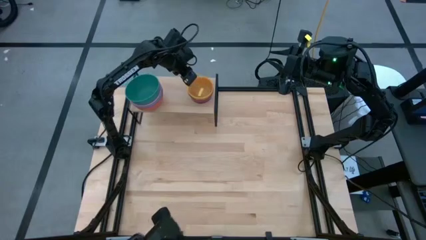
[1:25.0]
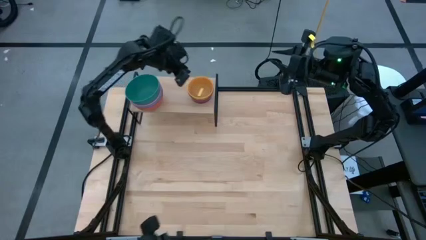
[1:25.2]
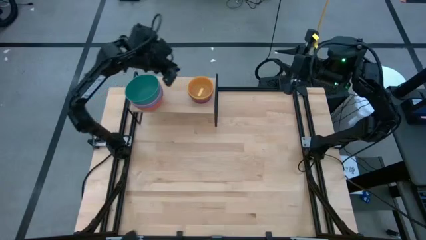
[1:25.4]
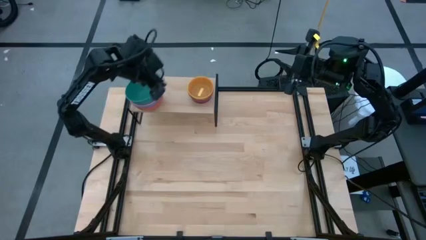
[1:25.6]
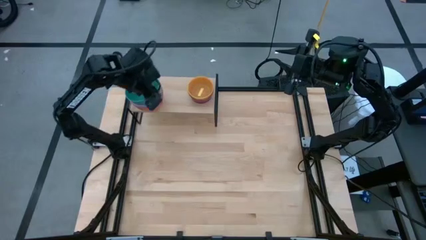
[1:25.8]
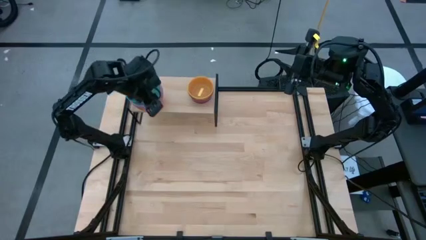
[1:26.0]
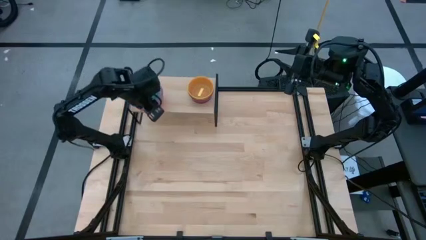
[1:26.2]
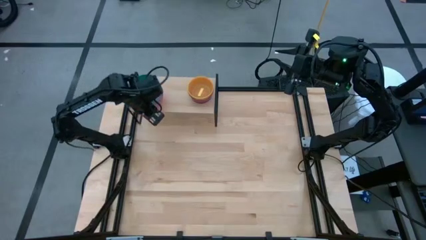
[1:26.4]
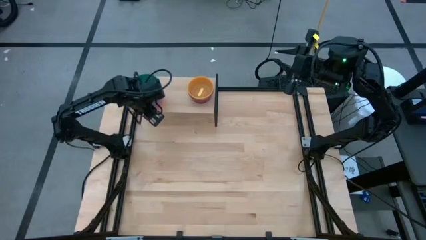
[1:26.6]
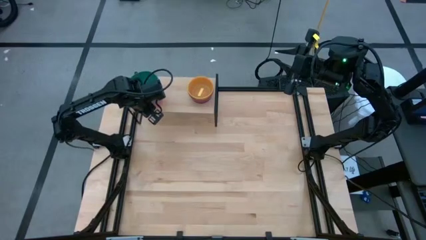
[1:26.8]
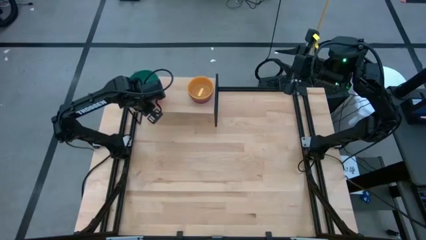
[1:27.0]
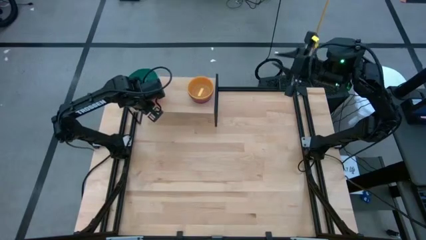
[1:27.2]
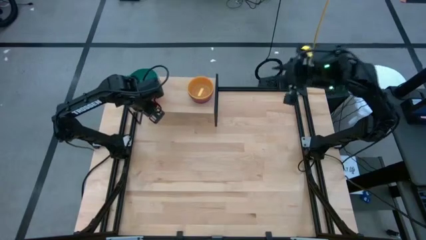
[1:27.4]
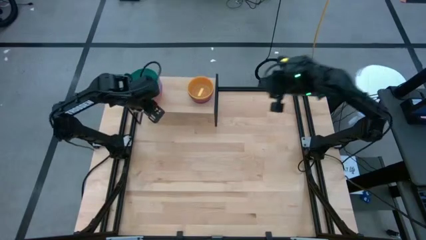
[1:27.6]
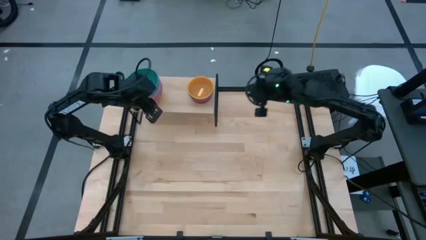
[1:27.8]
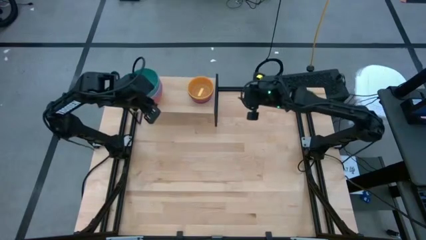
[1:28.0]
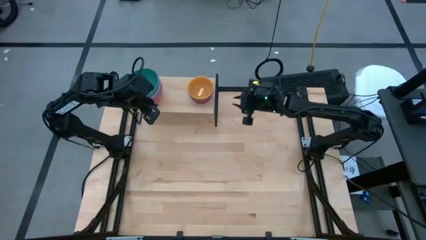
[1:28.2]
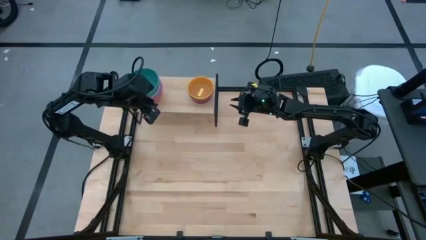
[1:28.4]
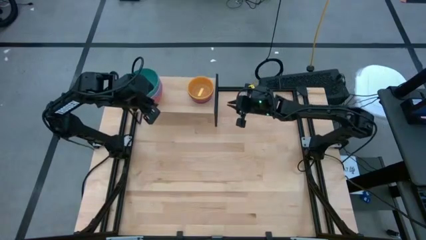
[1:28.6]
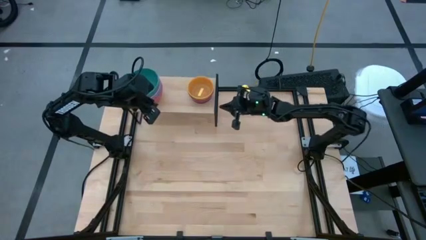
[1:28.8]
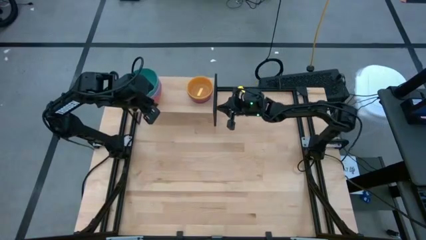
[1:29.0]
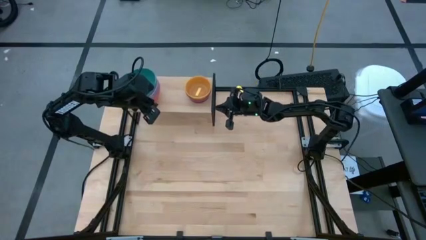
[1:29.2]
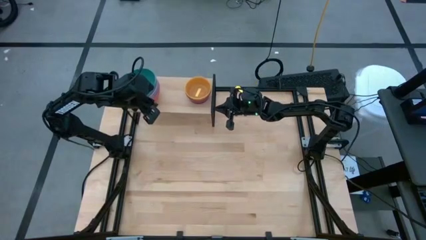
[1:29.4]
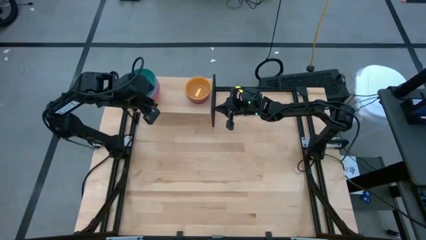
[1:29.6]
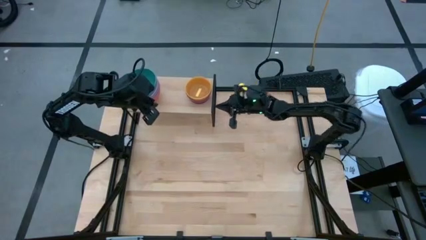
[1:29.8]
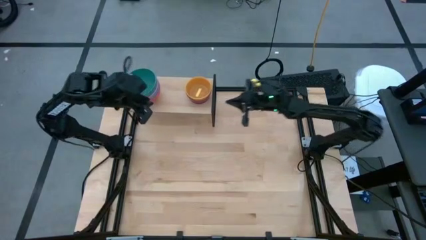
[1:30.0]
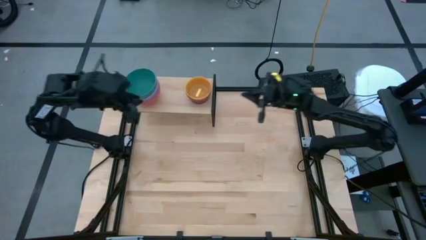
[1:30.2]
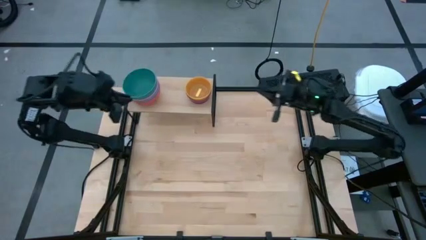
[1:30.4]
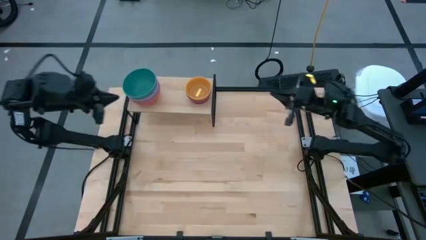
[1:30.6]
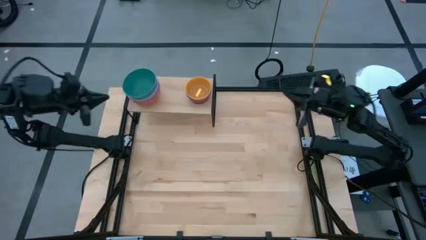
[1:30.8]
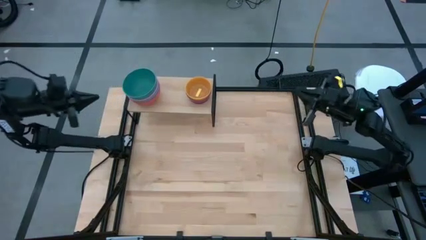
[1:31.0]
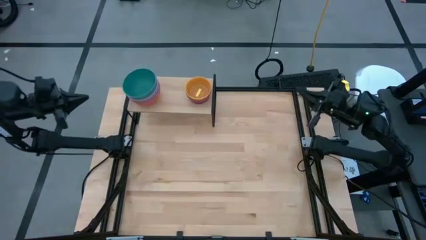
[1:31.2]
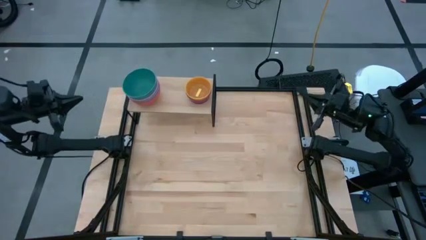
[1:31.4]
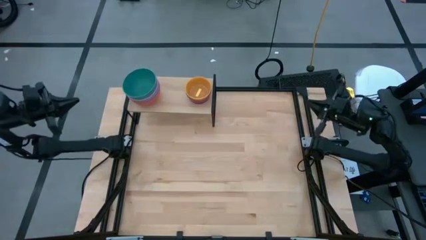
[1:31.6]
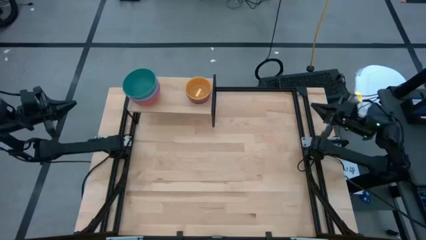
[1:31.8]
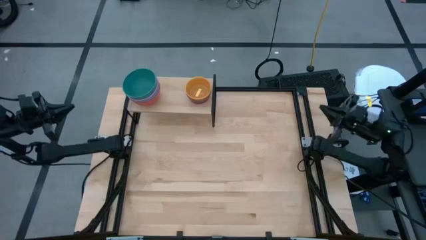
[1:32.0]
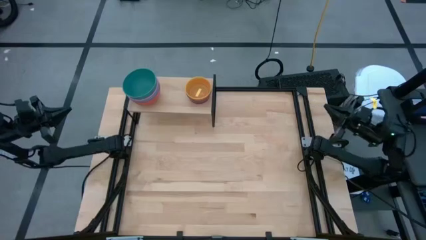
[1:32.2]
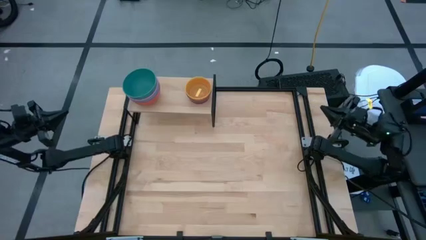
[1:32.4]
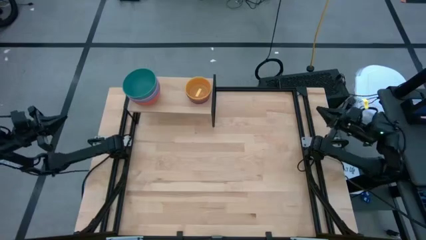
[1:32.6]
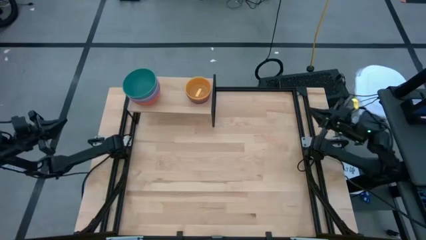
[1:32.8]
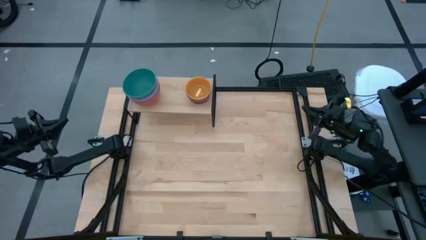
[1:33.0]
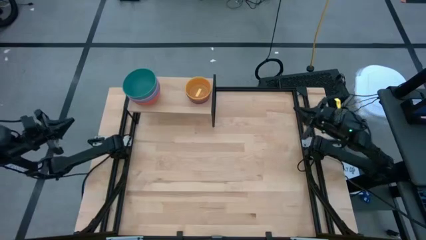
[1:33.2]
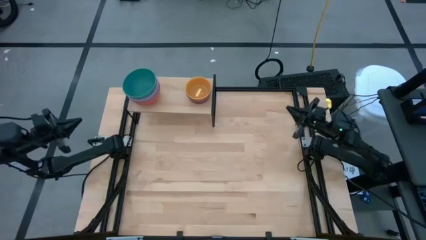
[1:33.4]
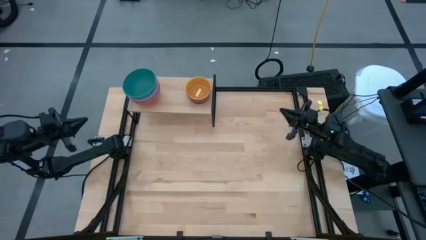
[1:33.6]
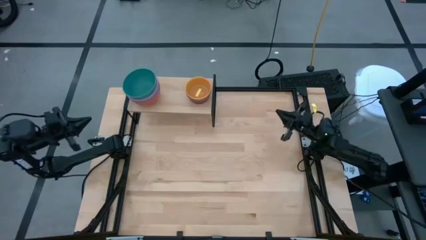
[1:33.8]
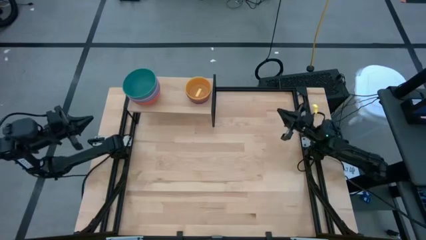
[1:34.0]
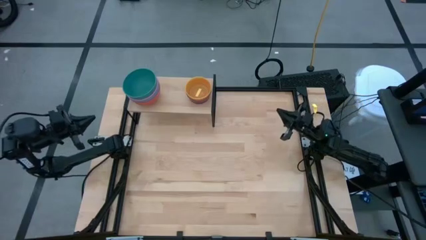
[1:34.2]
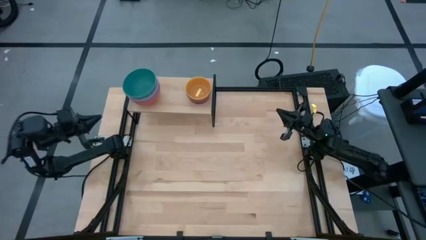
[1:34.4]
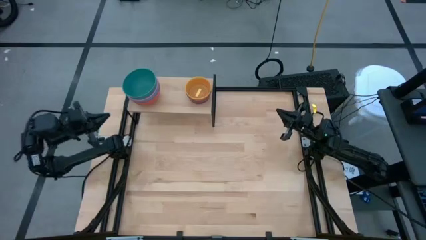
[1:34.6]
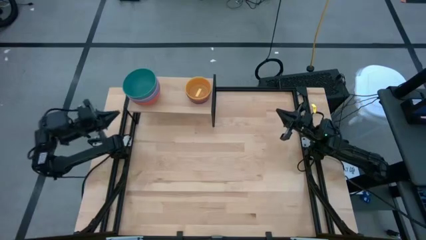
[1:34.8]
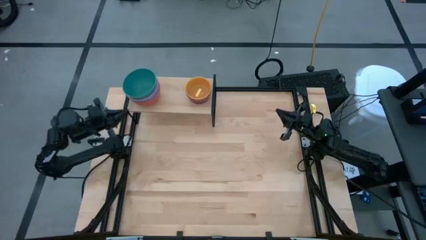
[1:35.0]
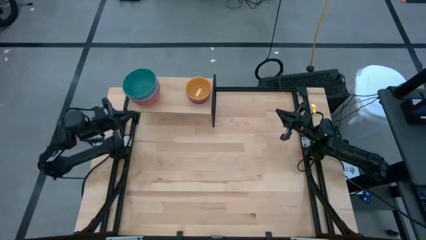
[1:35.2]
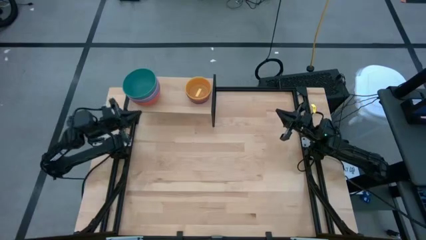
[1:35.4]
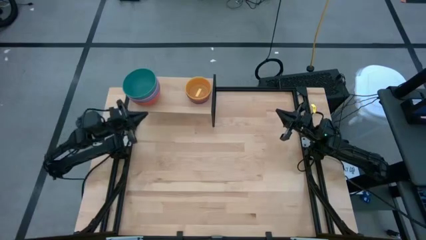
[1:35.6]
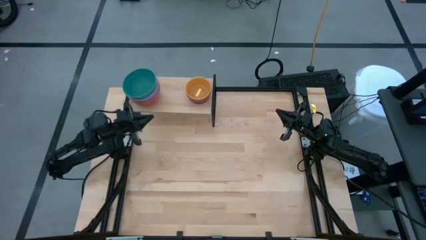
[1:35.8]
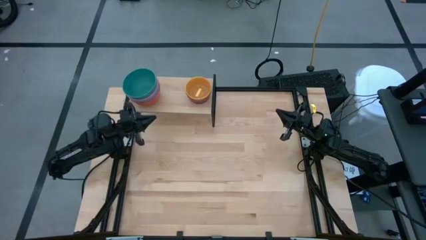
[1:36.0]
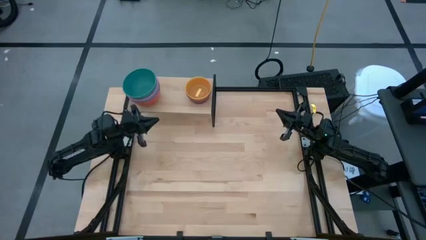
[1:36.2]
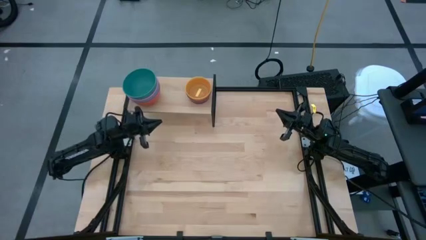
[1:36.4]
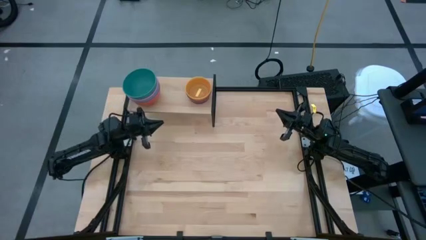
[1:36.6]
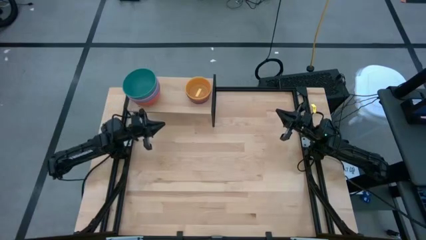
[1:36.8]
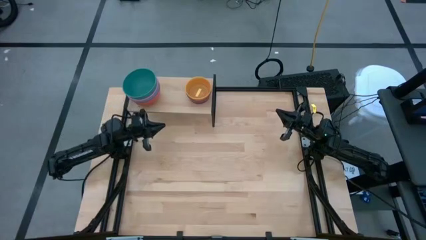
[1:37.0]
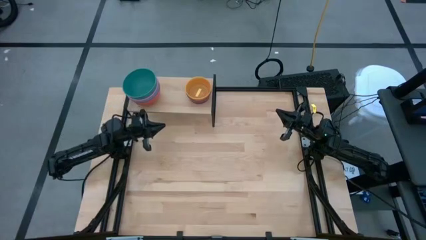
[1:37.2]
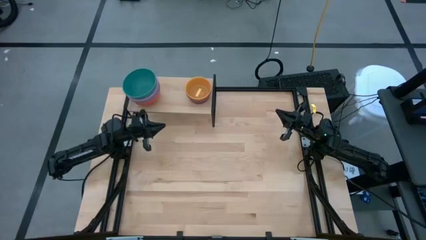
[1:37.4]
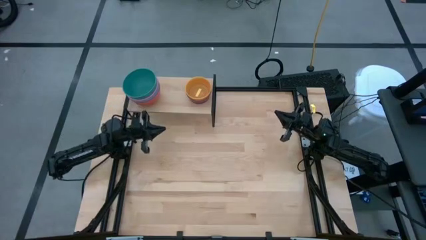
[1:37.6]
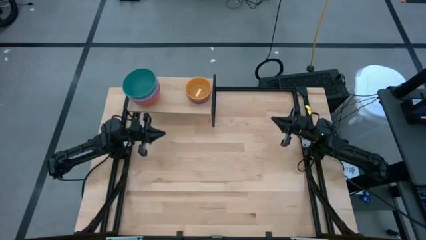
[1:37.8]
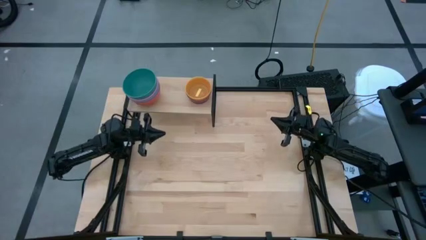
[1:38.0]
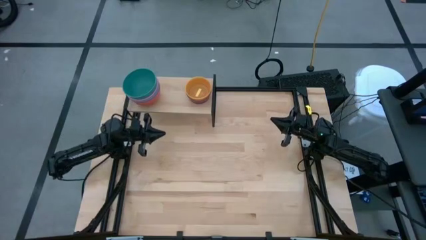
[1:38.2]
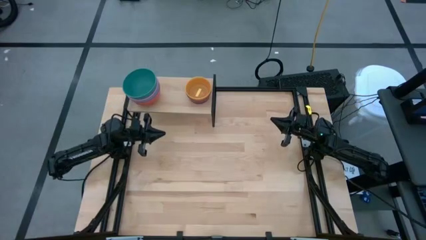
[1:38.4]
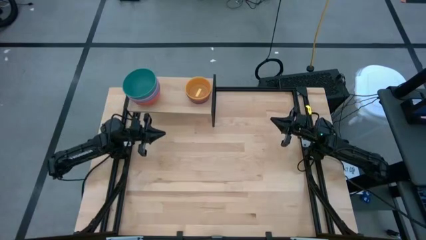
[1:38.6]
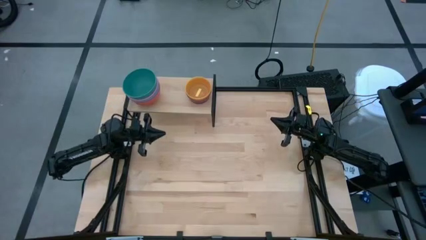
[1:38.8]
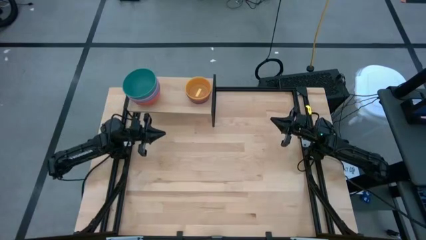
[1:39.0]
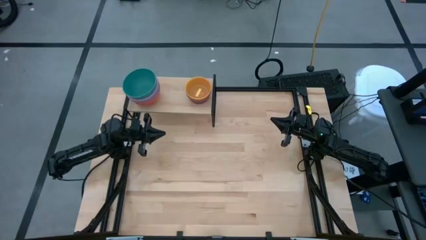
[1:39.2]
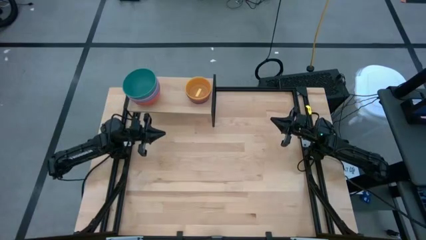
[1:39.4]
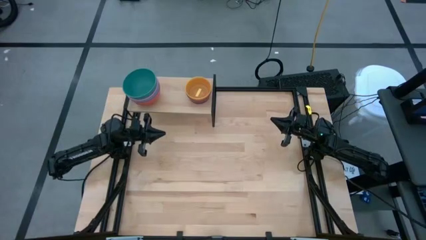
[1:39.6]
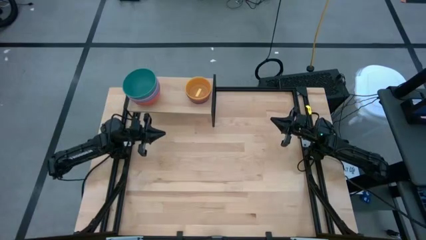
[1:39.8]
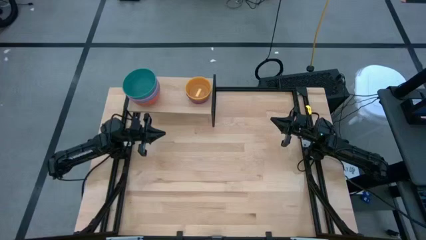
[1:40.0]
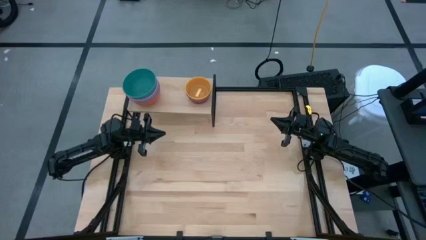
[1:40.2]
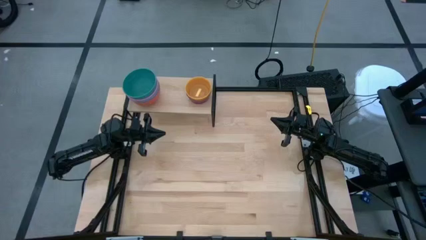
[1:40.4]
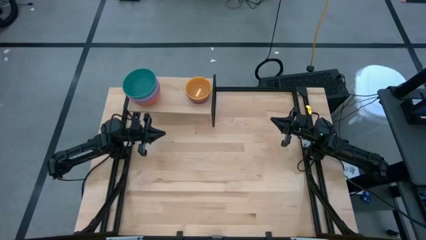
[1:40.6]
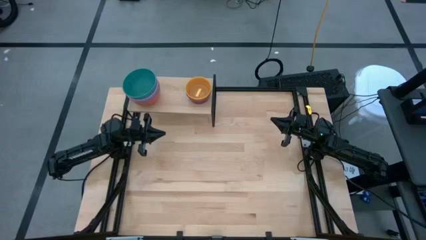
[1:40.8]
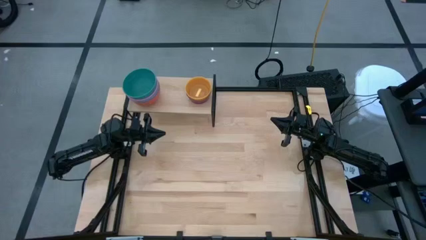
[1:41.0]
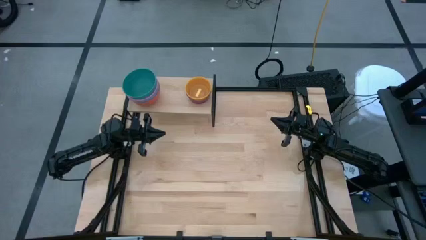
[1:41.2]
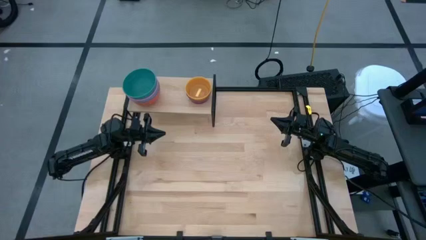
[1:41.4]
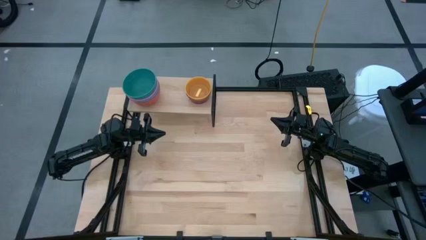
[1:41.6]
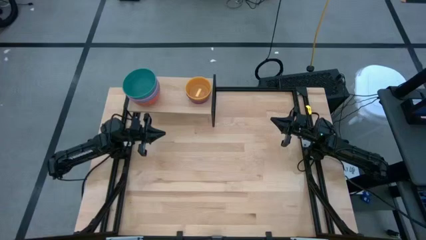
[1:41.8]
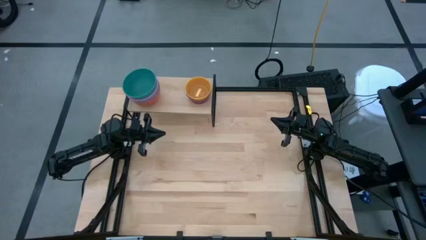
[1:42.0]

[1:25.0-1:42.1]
Task: Place and stack bowls onto a shelf
Return to Home Position
